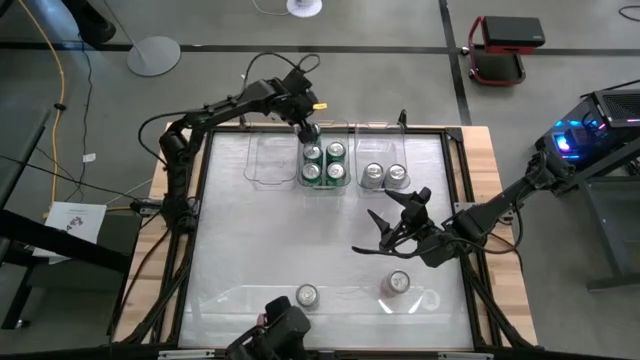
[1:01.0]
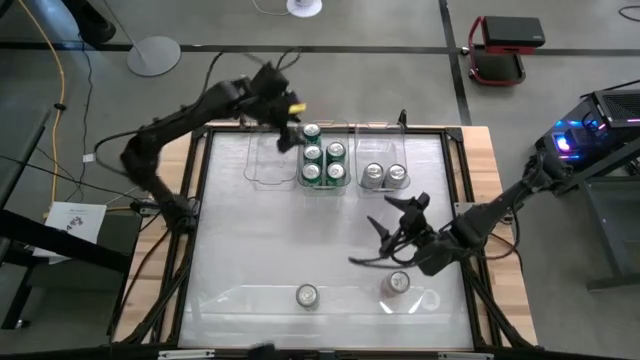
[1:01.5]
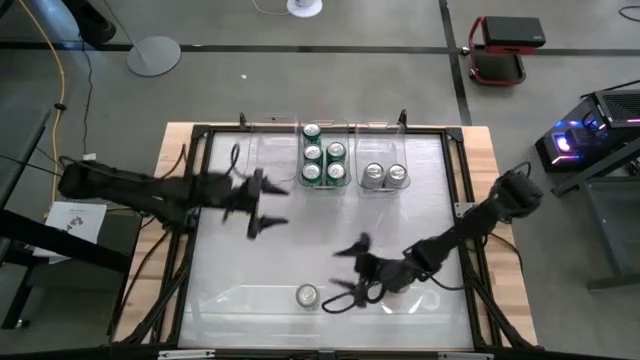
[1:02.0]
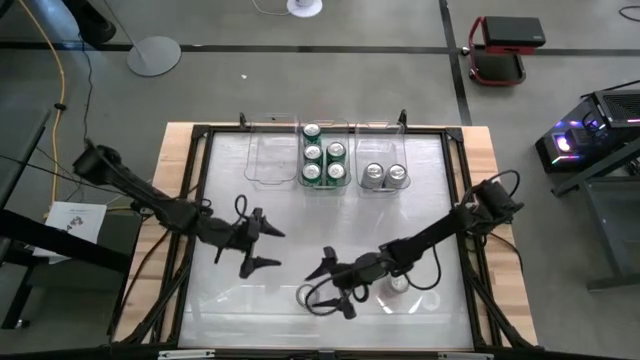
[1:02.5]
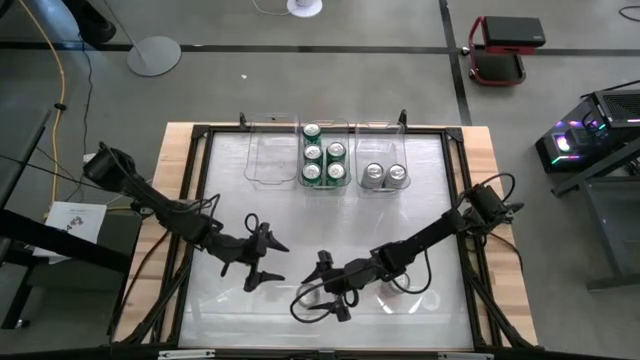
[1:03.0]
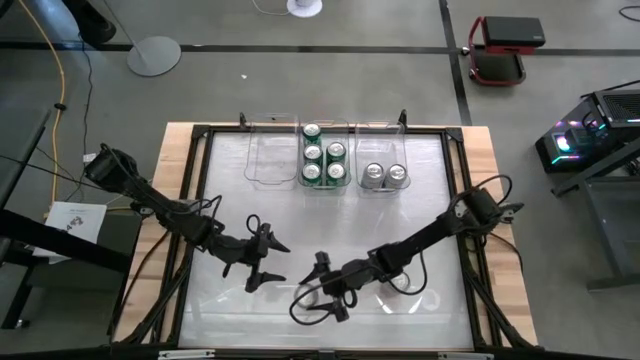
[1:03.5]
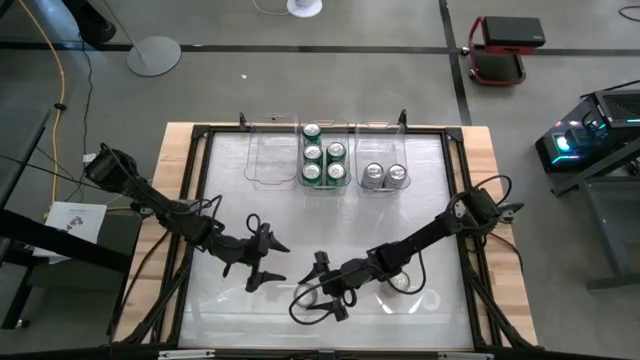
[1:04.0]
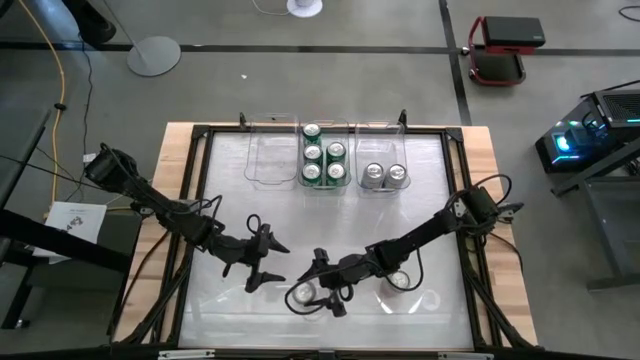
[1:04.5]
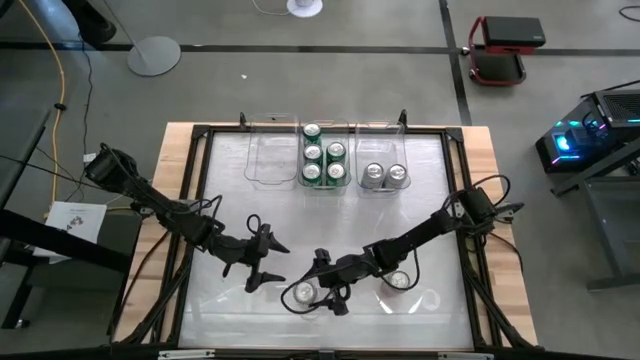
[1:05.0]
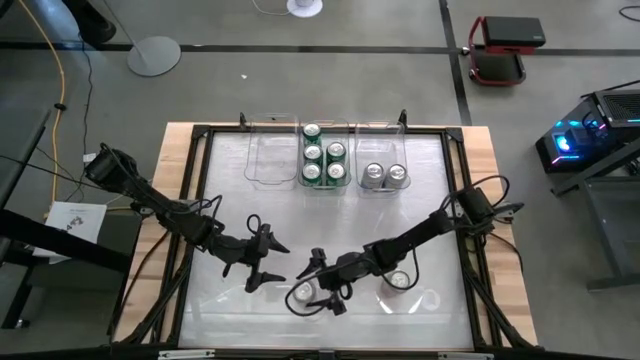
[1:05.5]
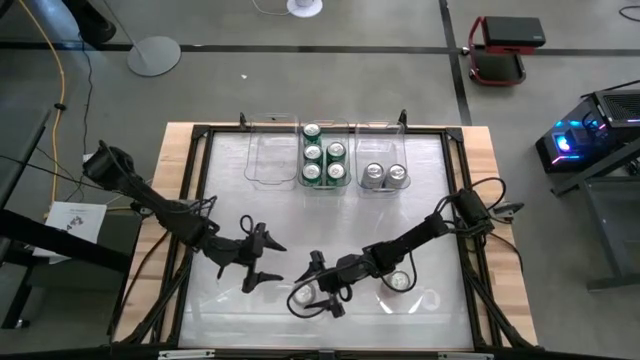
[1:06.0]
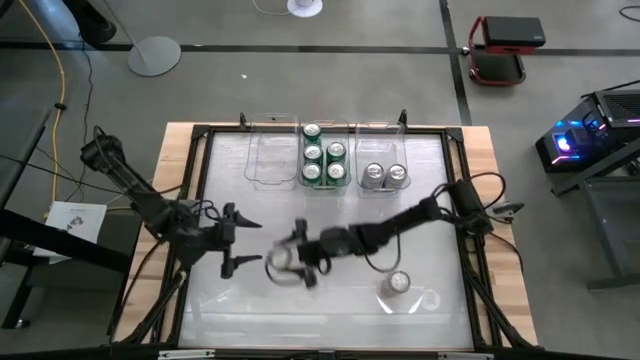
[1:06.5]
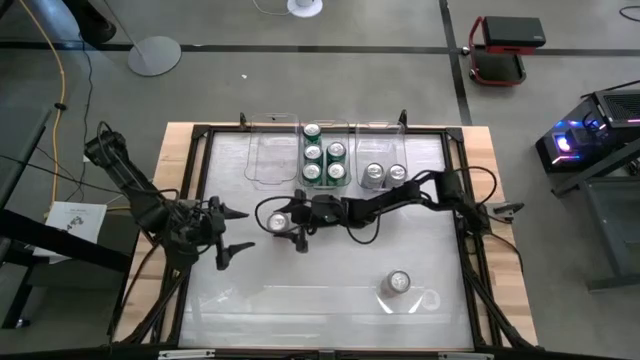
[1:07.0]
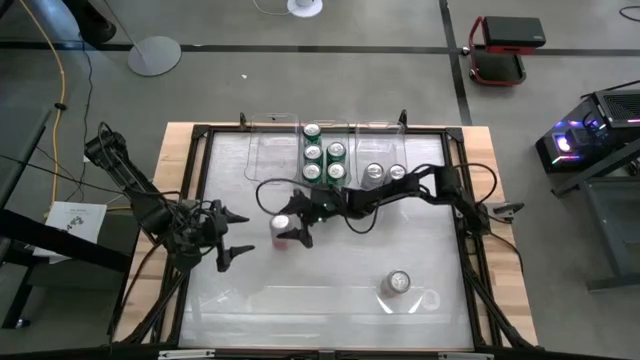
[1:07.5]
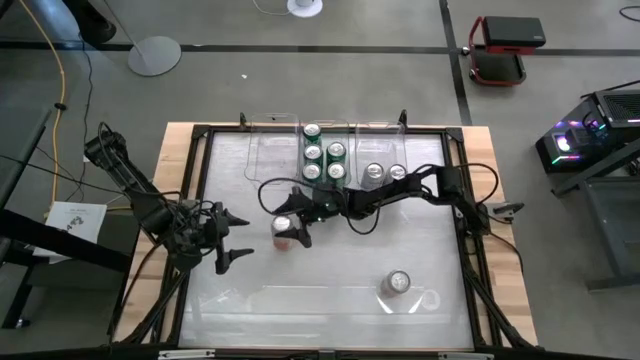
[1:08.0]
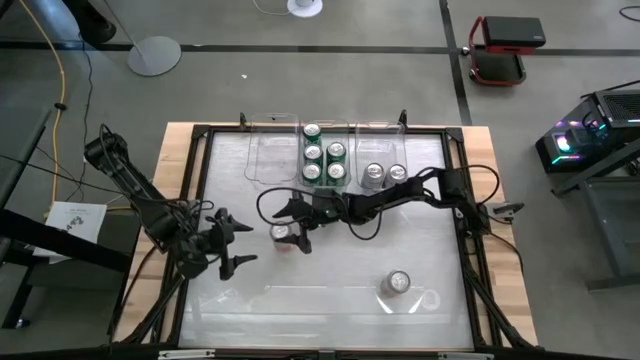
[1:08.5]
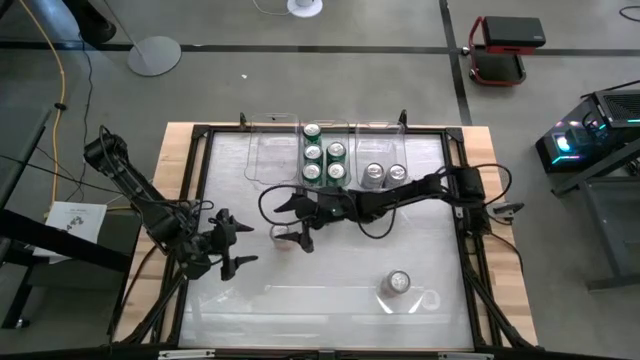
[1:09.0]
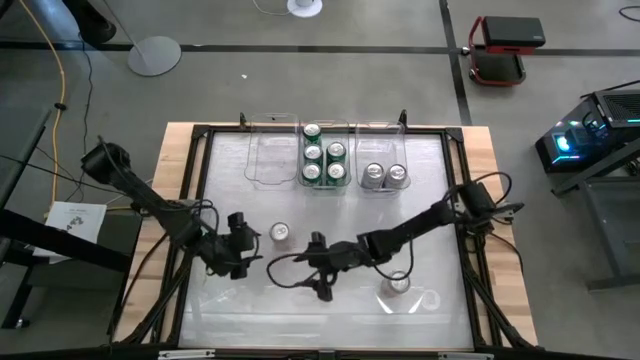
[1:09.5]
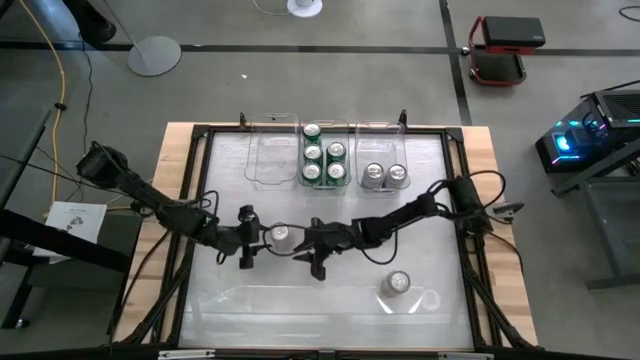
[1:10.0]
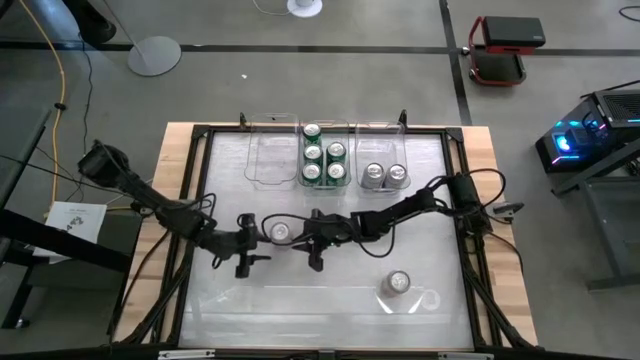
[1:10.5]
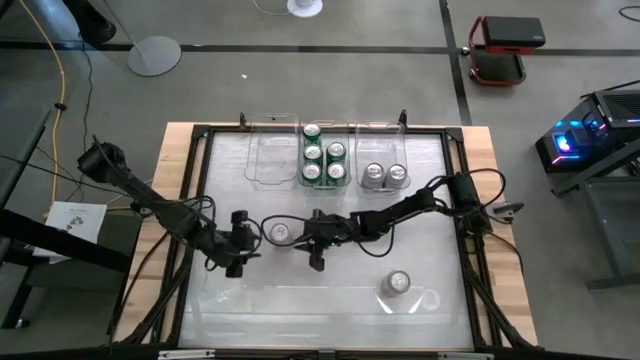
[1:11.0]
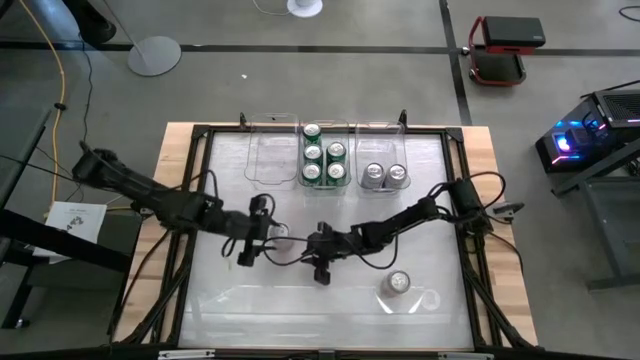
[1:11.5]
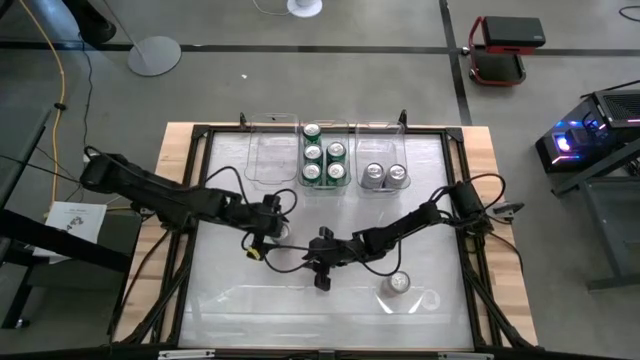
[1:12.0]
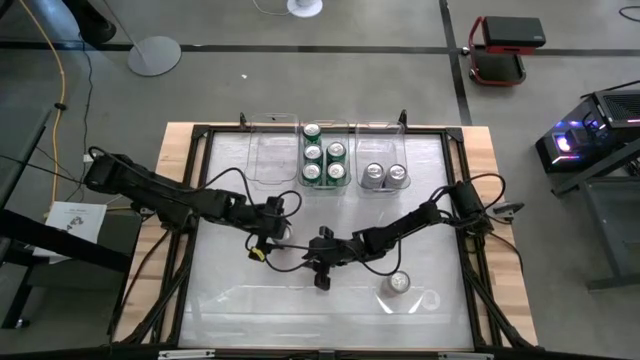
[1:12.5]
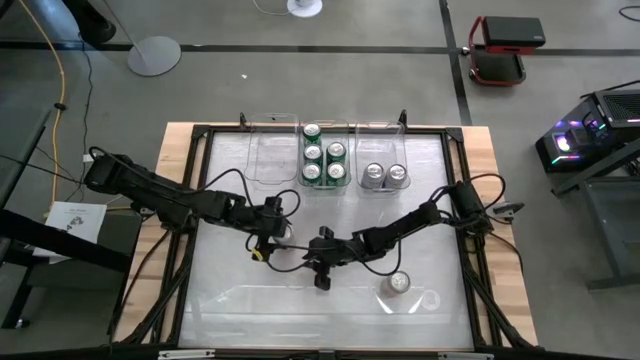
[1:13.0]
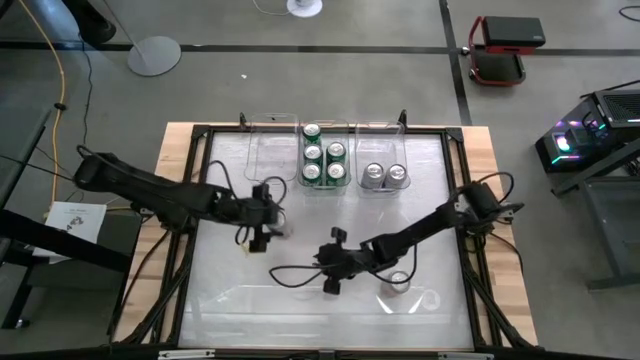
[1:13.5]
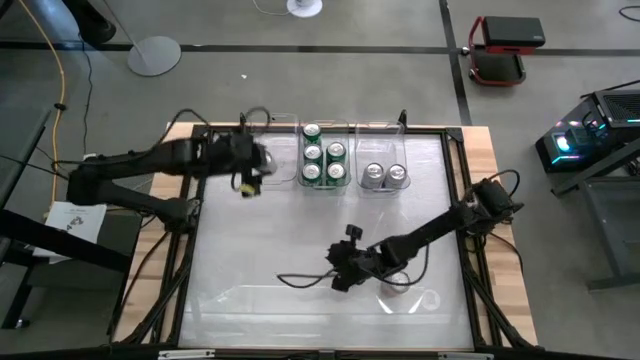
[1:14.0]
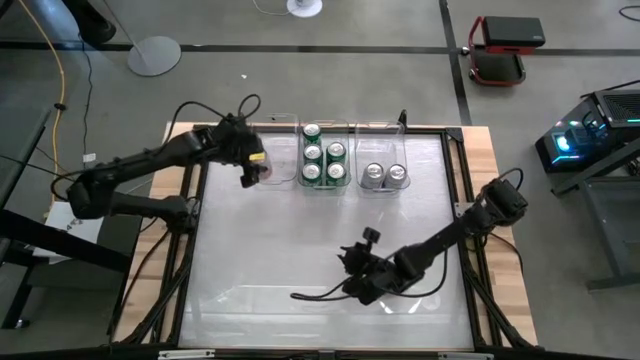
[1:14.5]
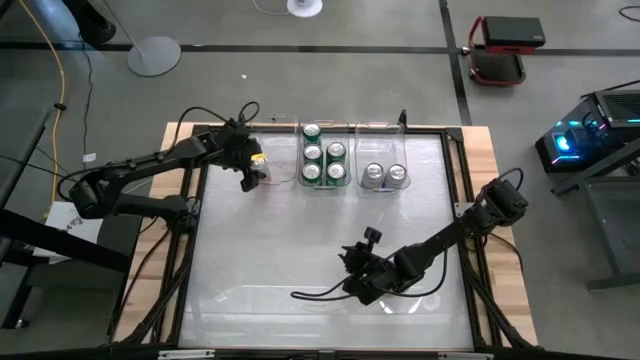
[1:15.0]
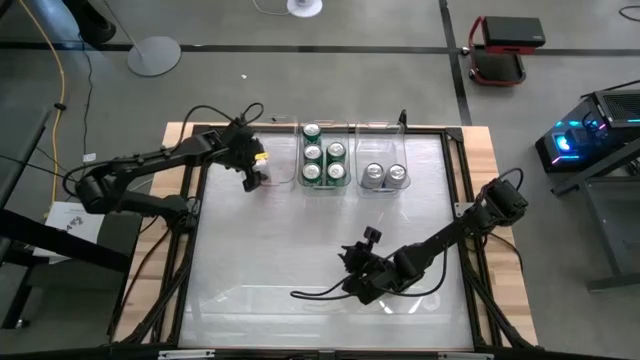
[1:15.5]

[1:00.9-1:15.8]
Task: Sort soda cans
Put the orange-white soda can into the left transparent bin

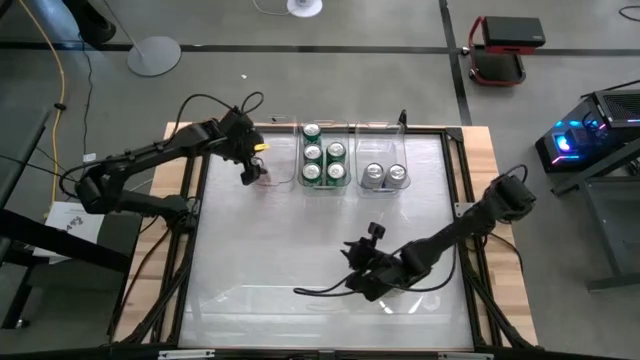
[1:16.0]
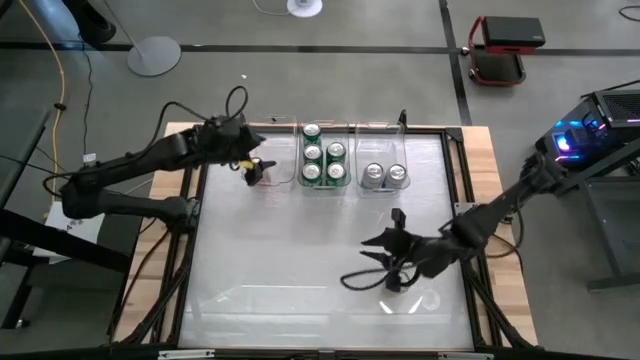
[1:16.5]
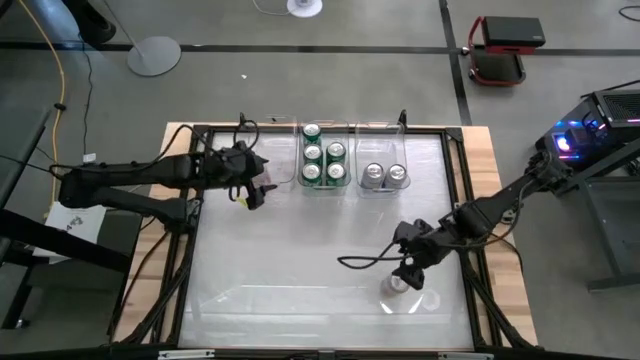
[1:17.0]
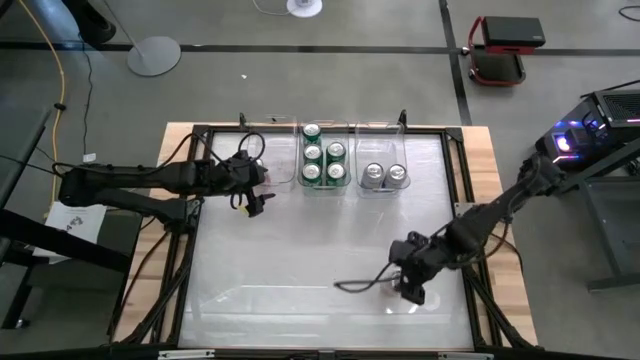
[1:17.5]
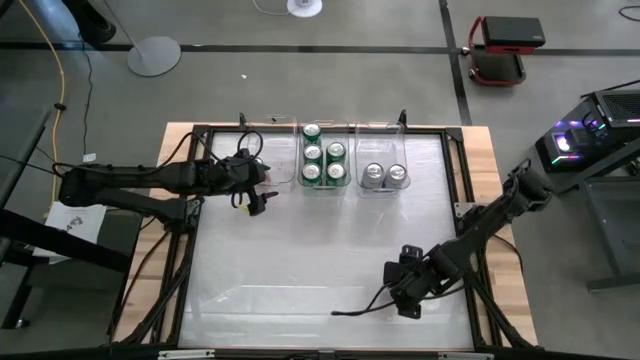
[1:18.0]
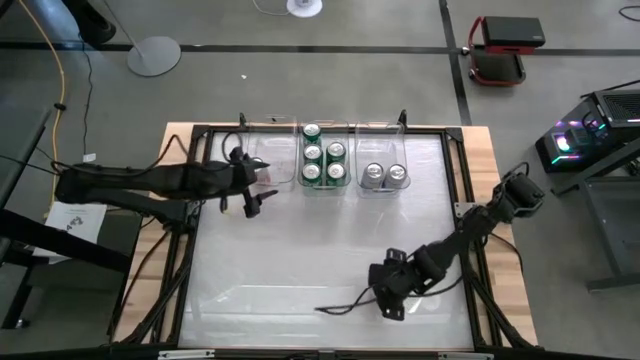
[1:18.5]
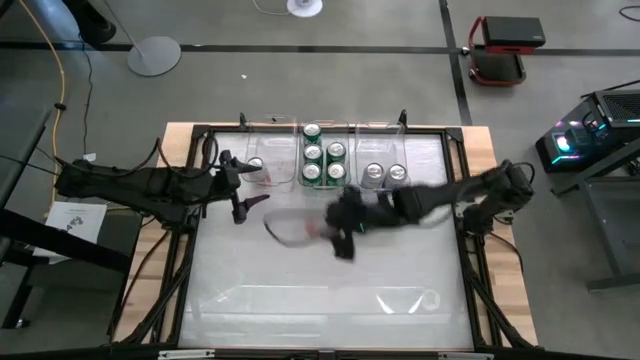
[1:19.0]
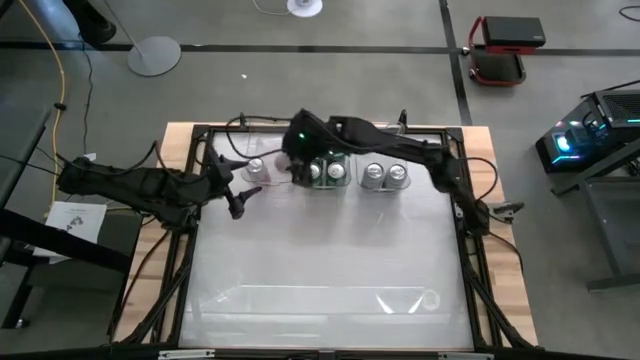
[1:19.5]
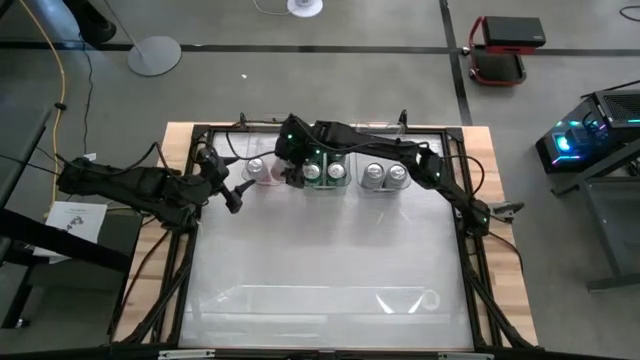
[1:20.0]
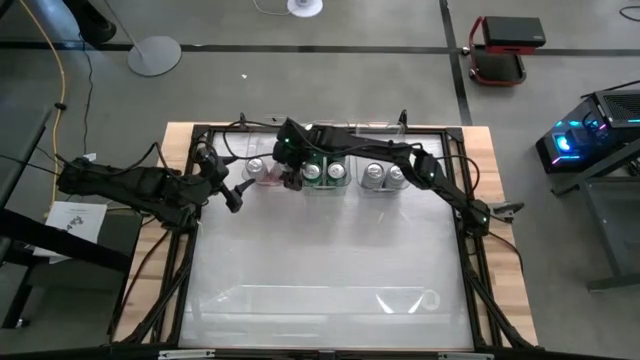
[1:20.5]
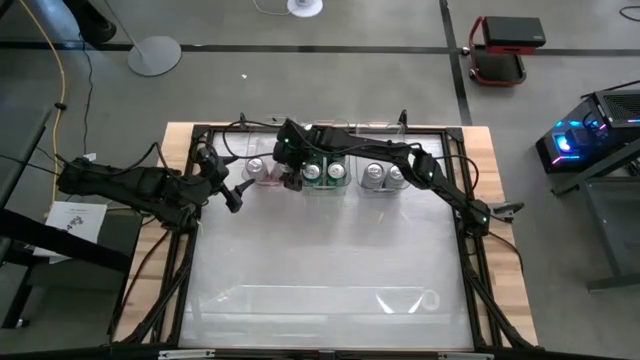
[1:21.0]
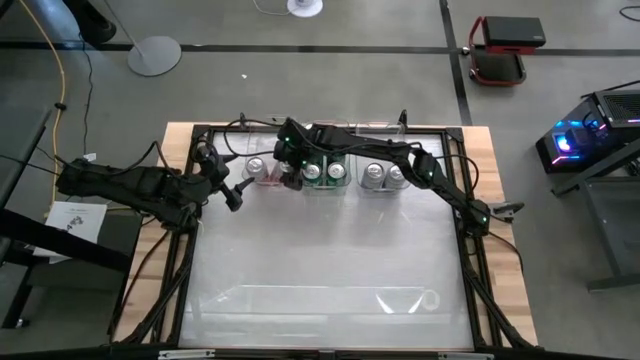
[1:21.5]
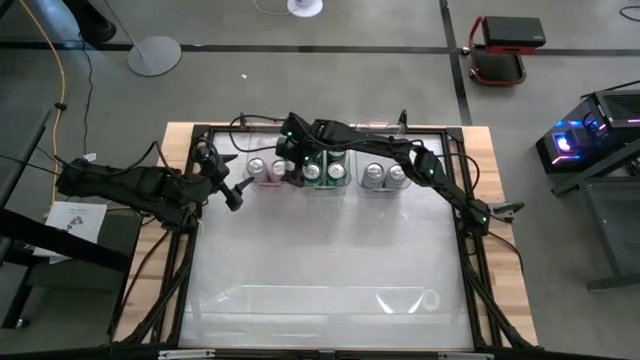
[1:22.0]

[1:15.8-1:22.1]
Put the orange-white soda can into the left transparent bin
